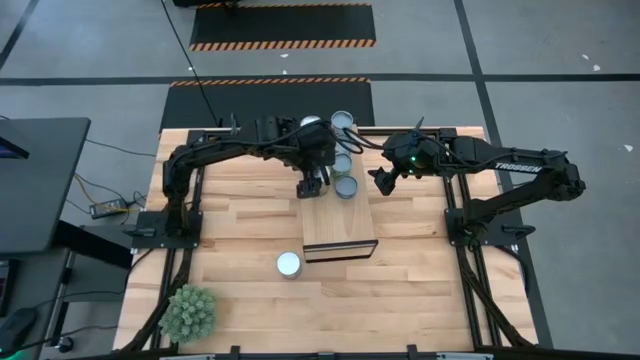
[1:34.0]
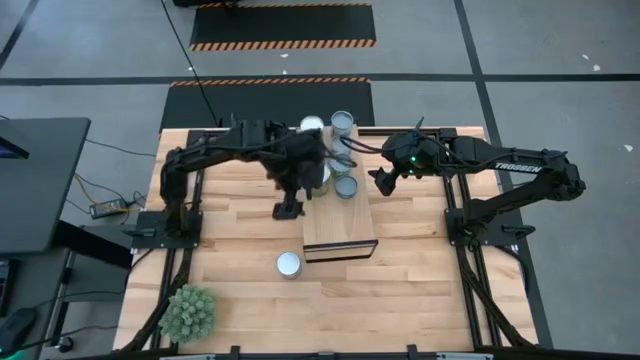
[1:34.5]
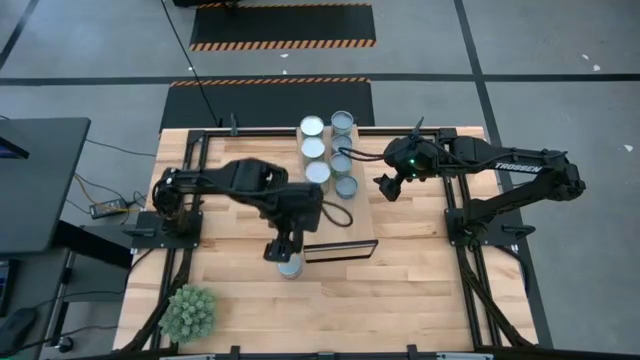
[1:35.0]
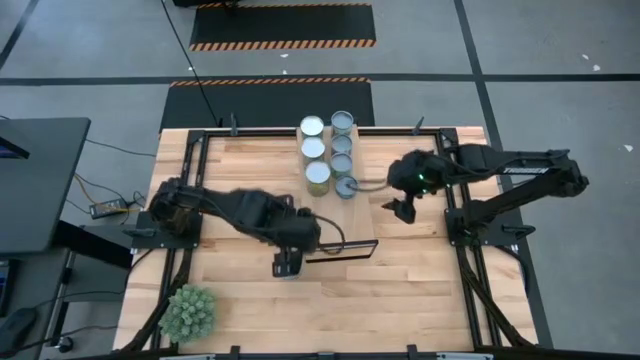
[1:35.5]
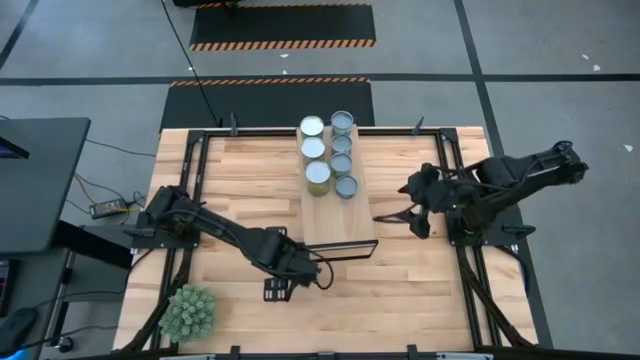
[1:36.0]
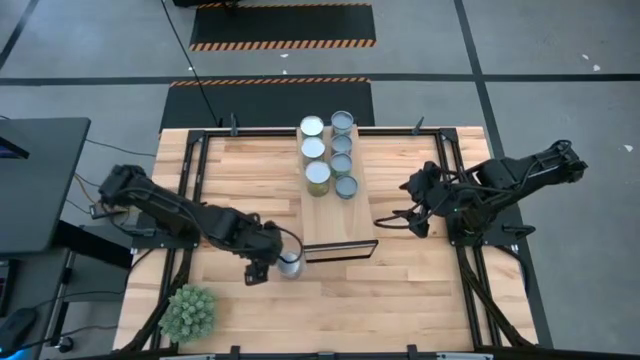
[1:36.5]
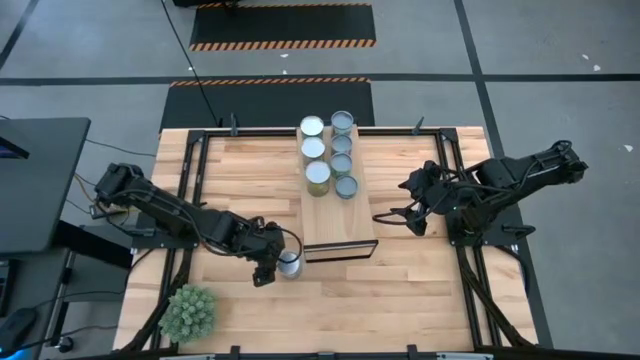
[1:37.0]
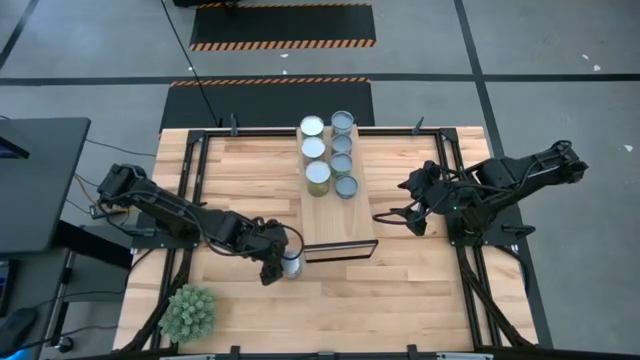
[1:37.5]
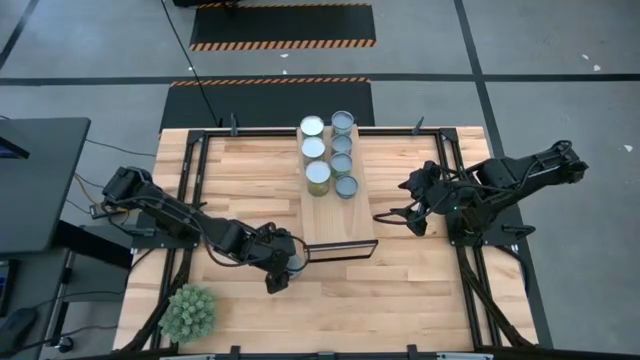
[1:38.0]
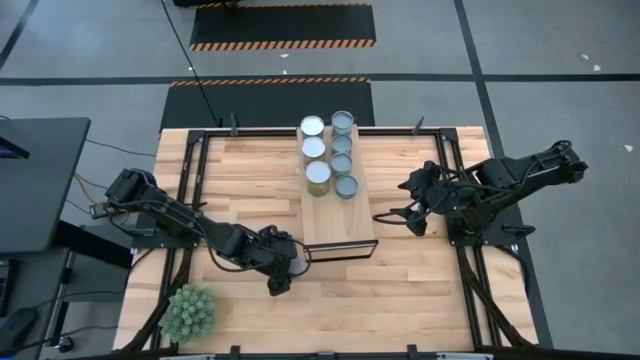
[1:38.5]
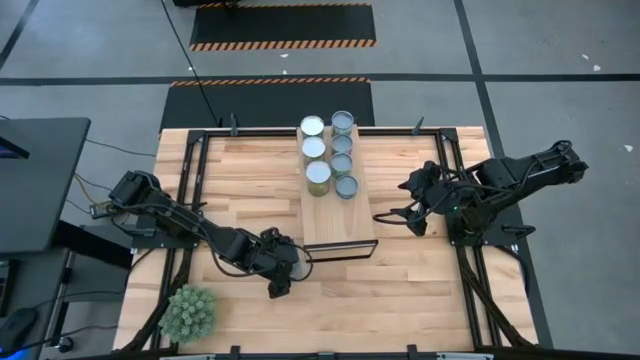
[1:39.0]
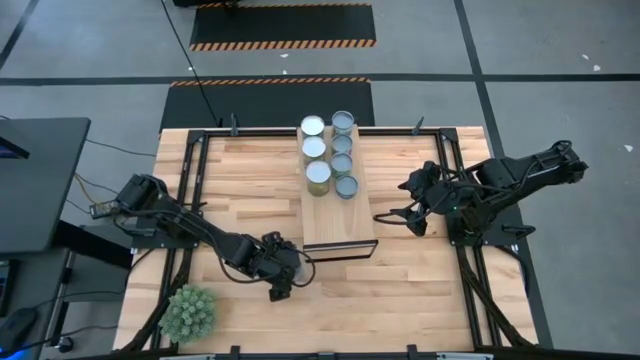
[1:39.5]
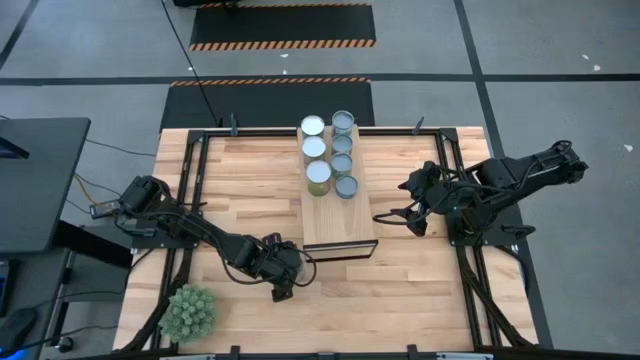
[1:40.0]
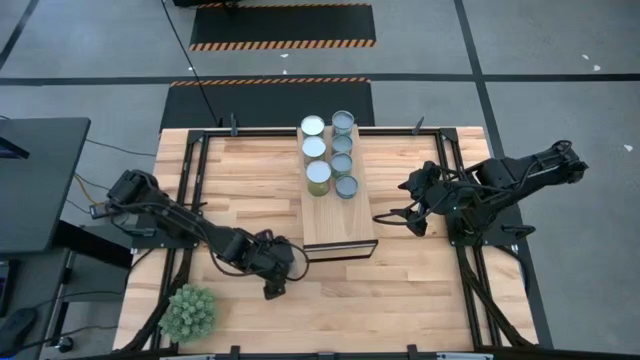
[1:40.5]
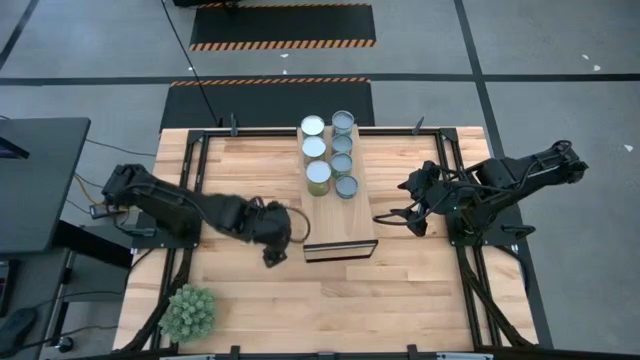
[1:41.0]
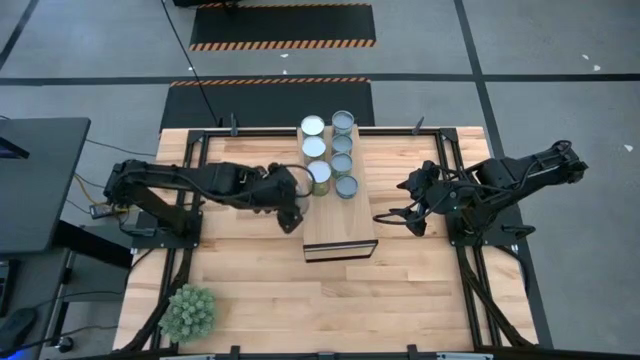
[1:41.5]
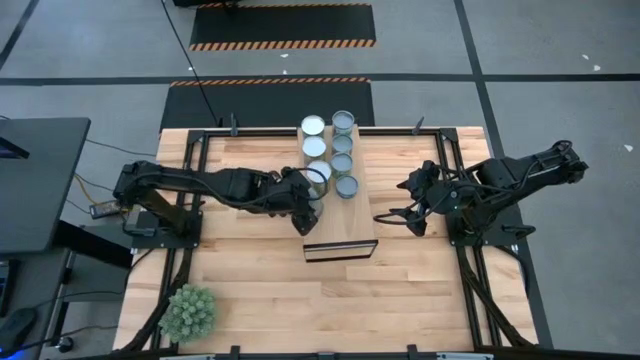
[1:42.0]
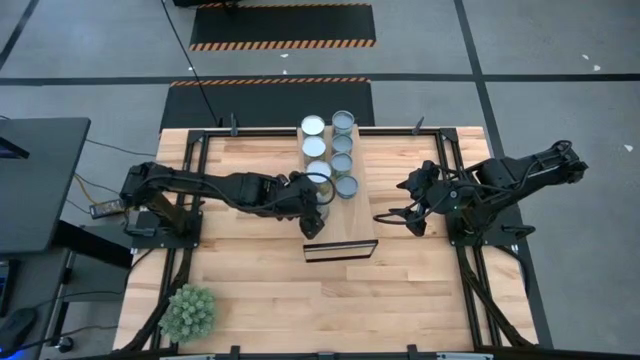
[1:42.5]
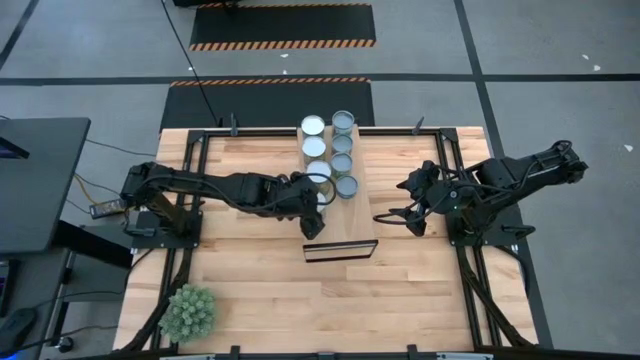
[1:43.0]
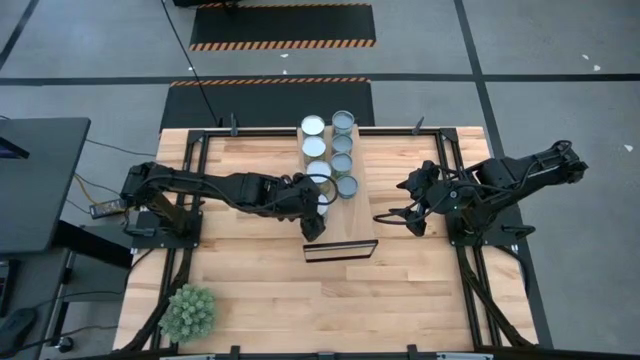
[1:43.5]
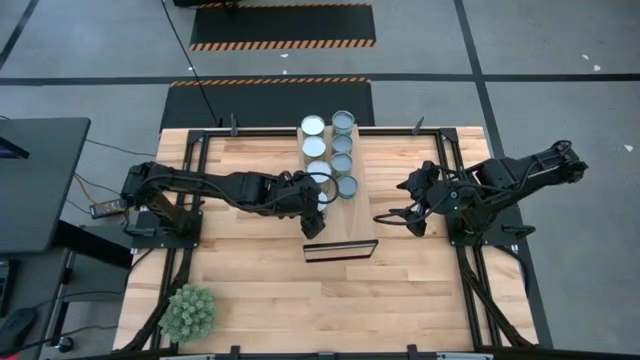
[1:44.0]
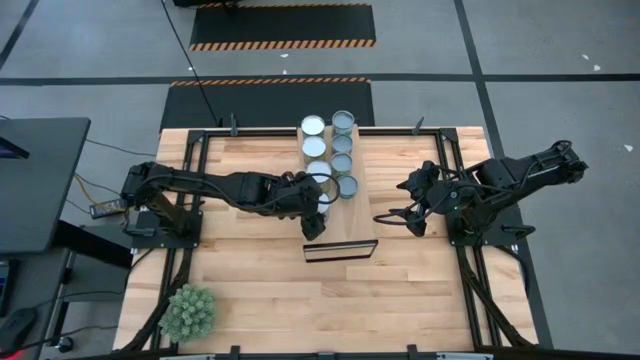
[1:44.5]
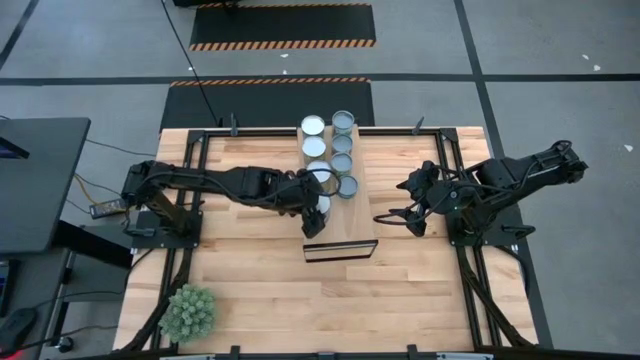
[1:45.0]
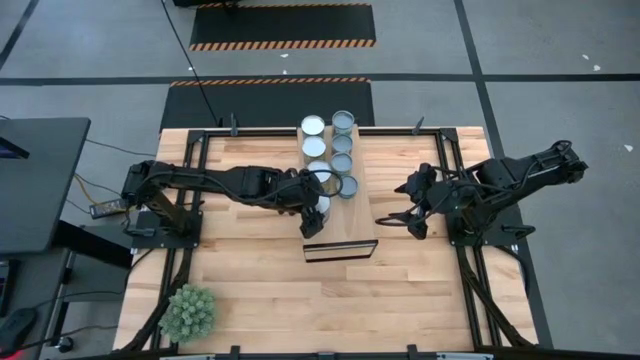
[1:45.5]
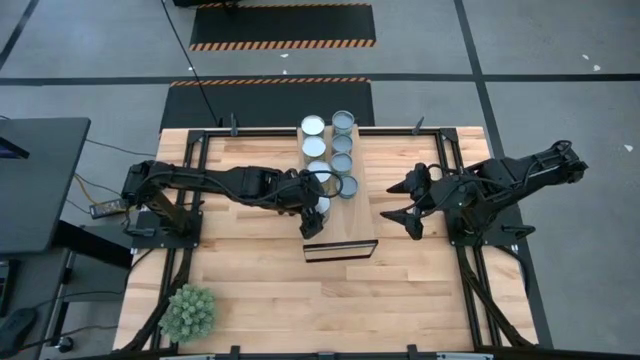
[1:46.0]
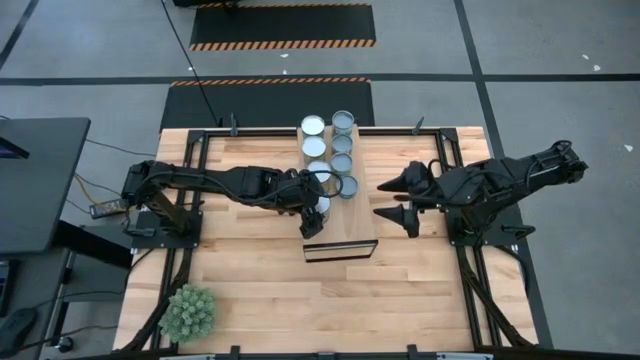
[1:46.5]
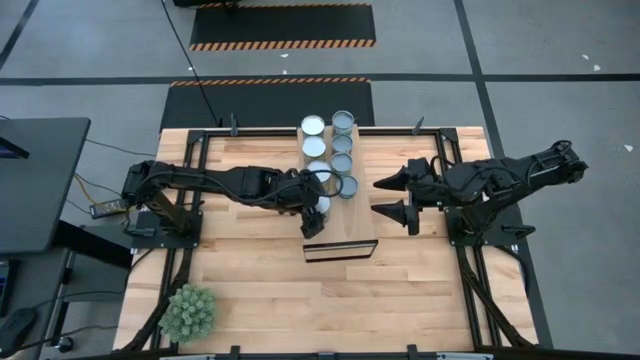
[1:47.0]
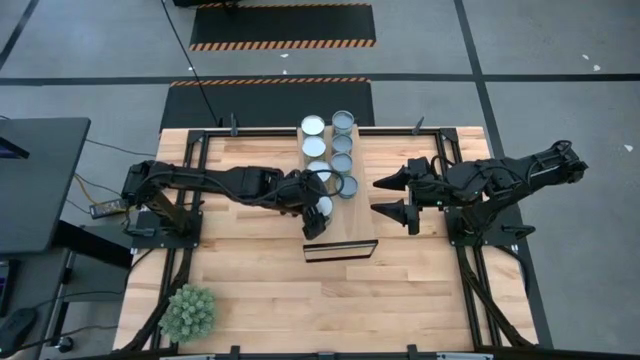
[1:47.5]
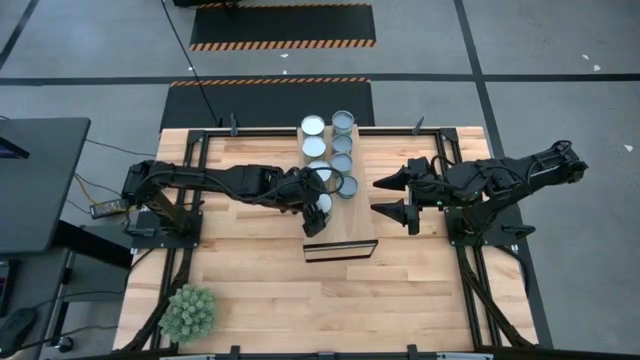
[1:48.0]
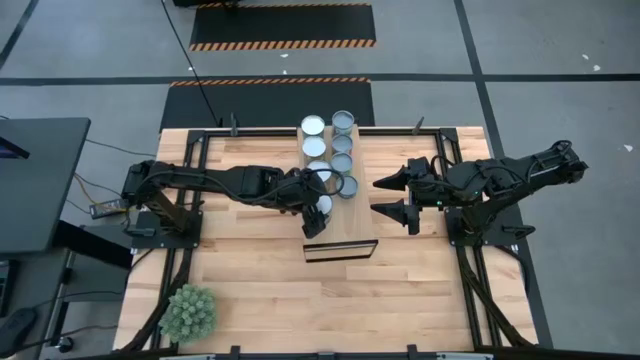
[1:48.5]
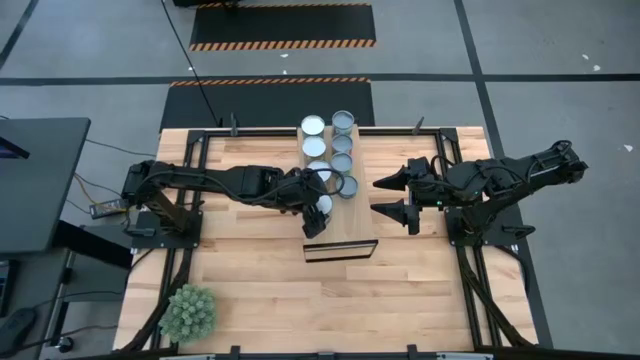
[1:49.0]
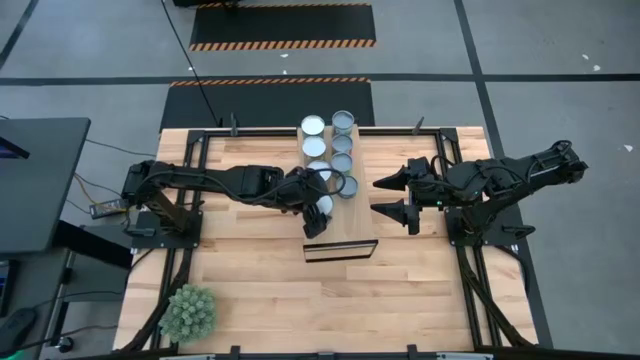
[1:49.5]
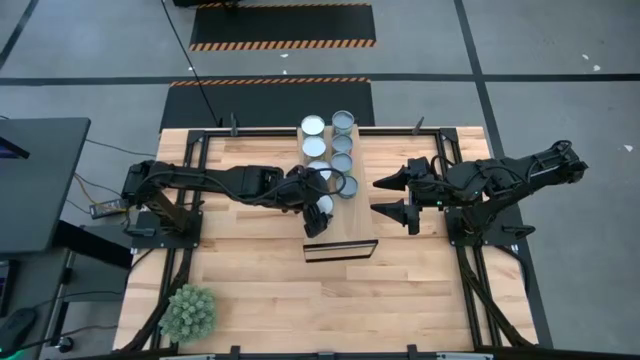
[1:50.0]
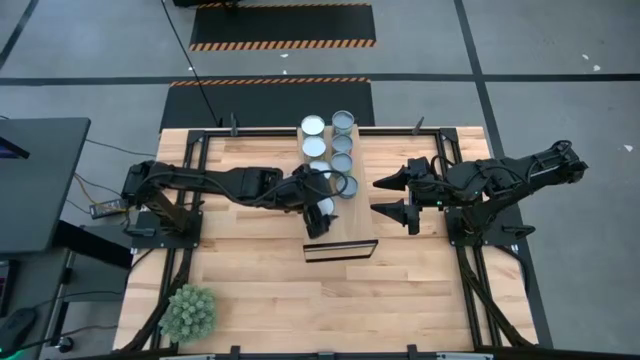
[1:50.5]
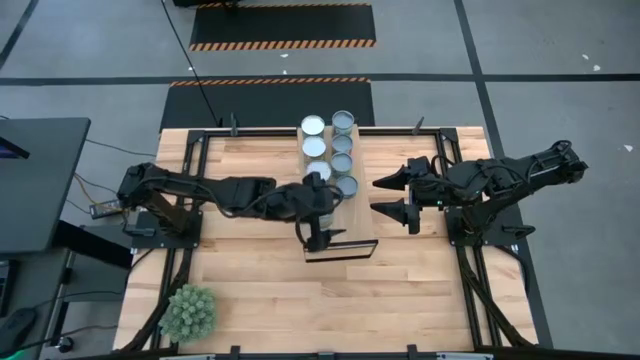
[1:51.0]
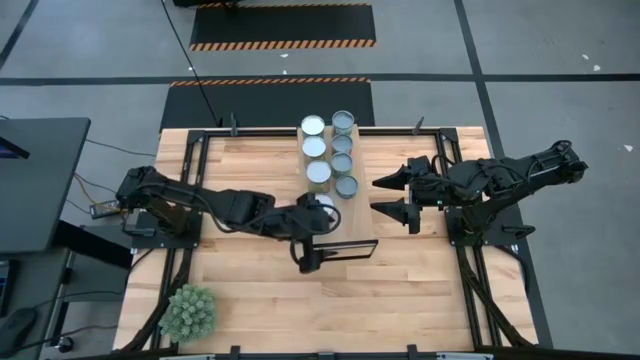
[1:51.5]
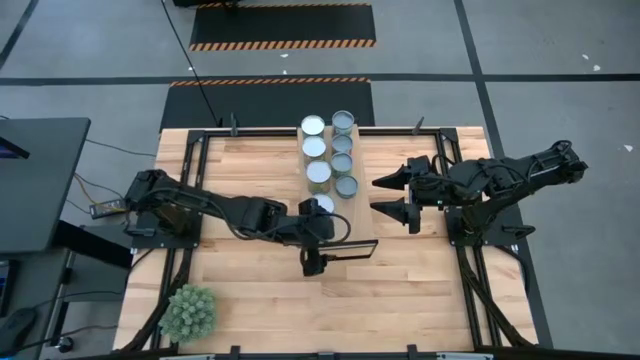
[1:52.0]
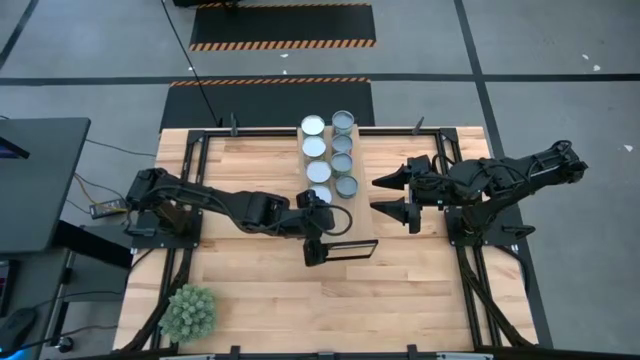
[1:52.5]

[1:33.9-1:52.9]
Task: Pick and place cans onto a shelf
Put the canned peas on the shelf
